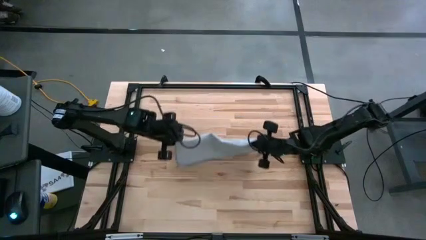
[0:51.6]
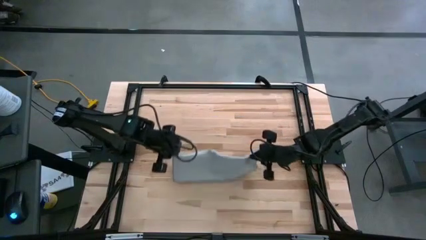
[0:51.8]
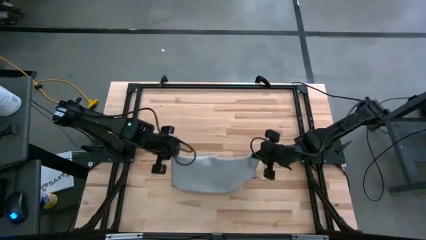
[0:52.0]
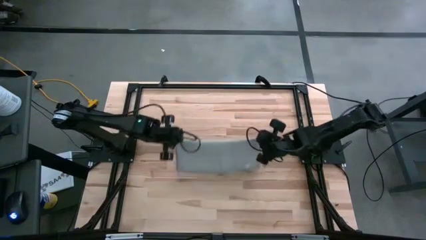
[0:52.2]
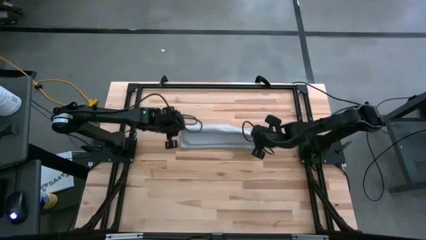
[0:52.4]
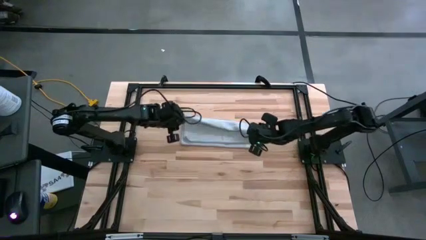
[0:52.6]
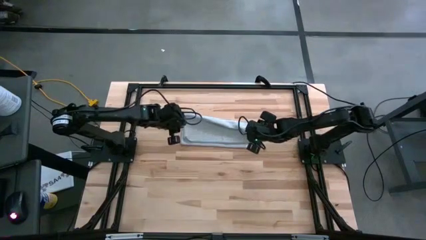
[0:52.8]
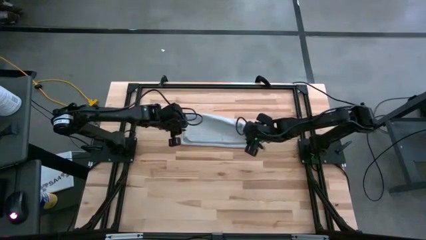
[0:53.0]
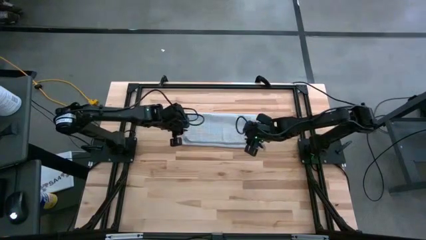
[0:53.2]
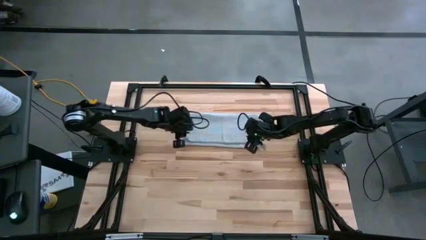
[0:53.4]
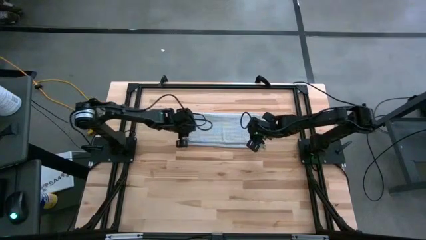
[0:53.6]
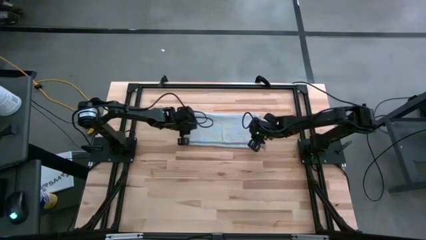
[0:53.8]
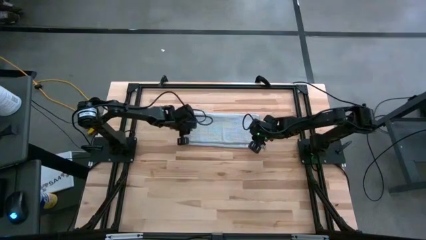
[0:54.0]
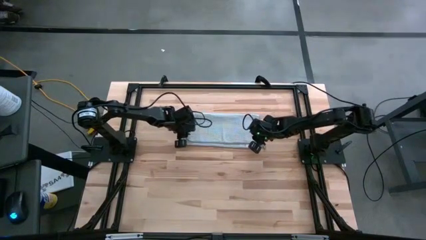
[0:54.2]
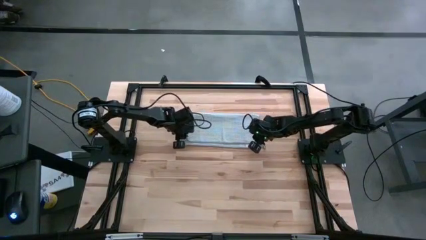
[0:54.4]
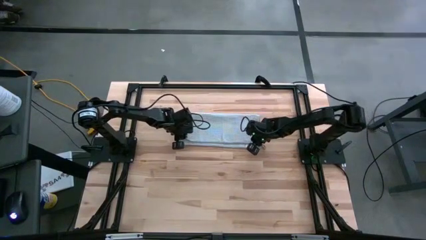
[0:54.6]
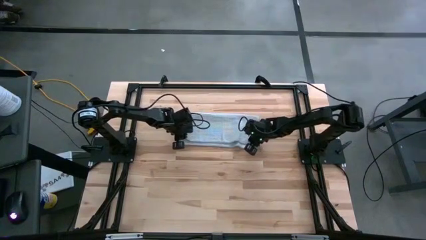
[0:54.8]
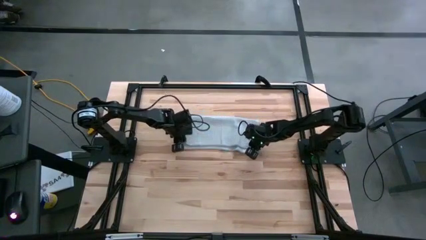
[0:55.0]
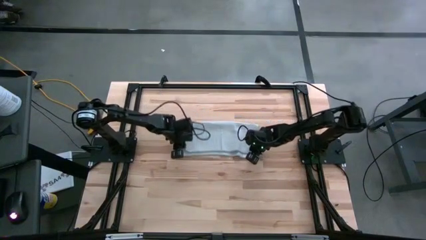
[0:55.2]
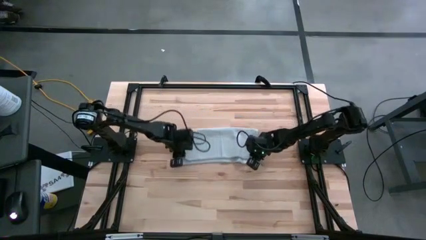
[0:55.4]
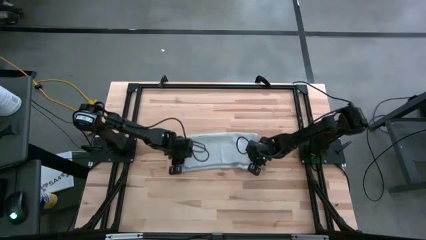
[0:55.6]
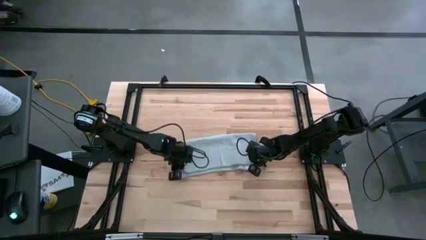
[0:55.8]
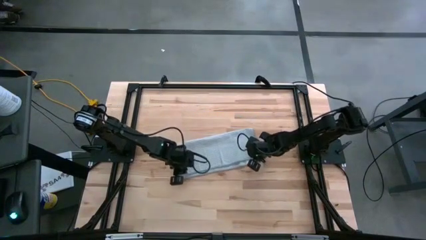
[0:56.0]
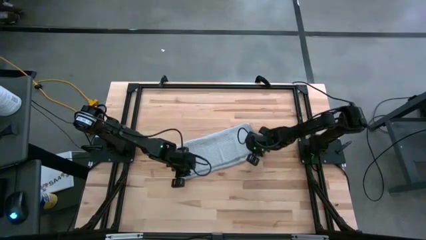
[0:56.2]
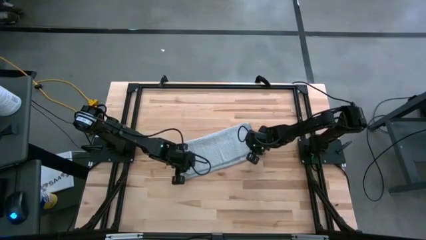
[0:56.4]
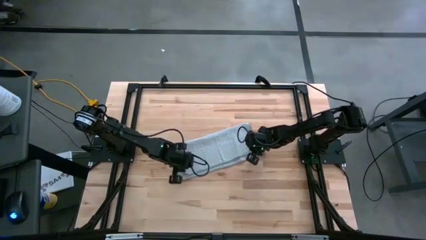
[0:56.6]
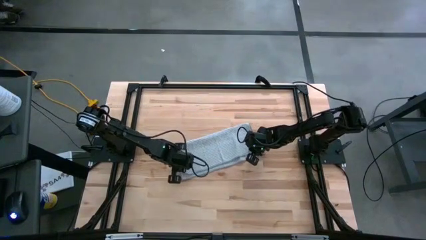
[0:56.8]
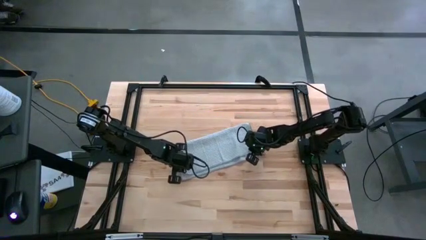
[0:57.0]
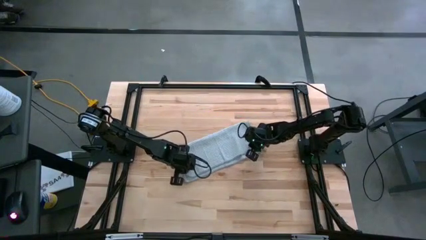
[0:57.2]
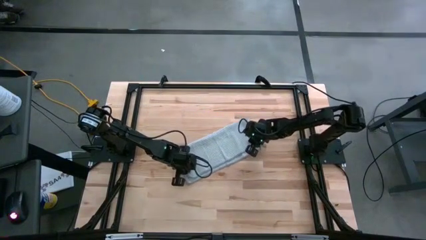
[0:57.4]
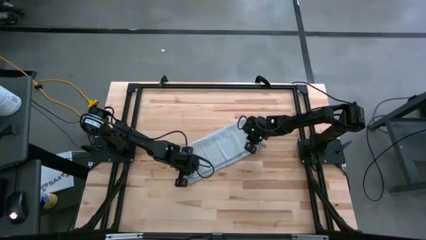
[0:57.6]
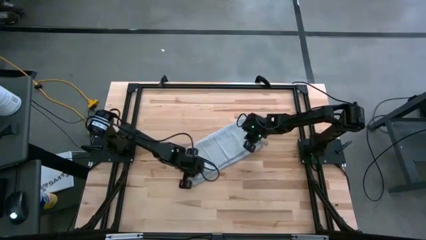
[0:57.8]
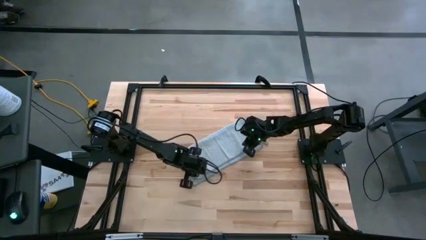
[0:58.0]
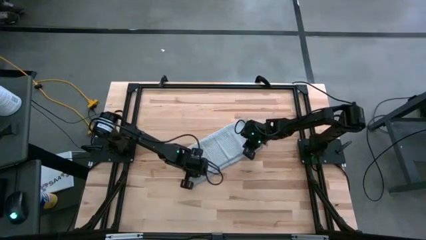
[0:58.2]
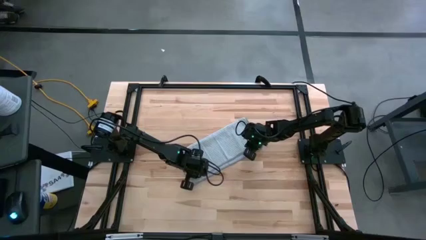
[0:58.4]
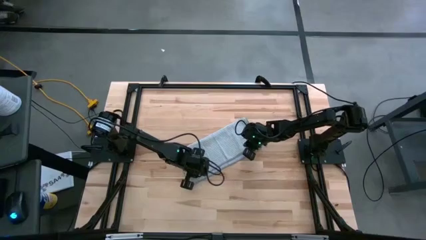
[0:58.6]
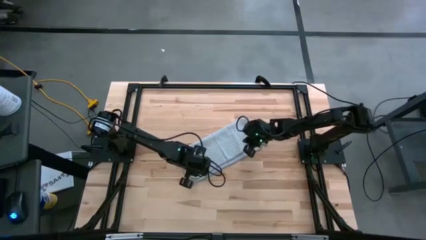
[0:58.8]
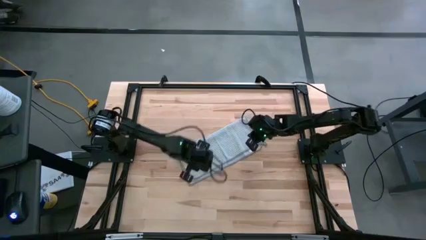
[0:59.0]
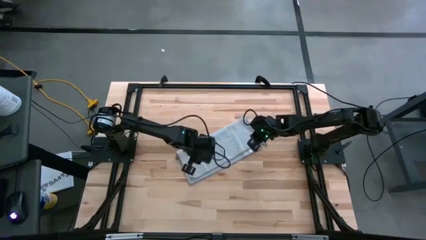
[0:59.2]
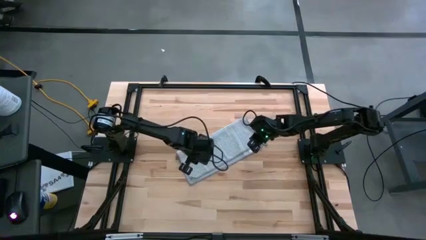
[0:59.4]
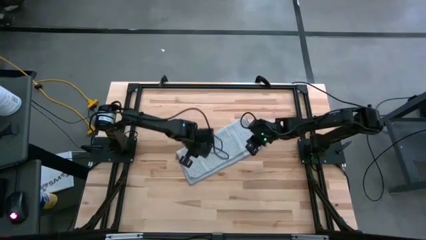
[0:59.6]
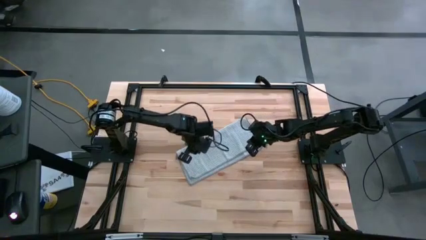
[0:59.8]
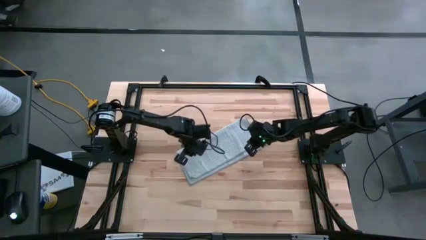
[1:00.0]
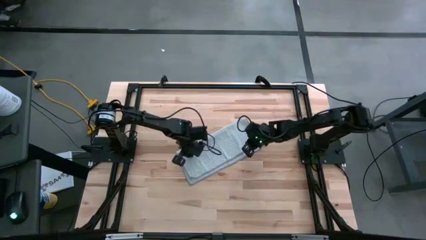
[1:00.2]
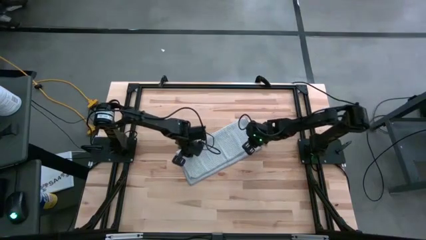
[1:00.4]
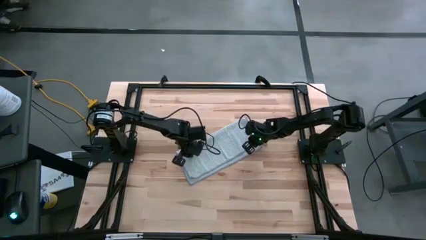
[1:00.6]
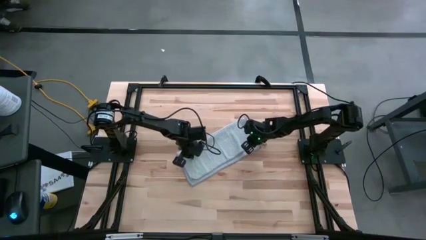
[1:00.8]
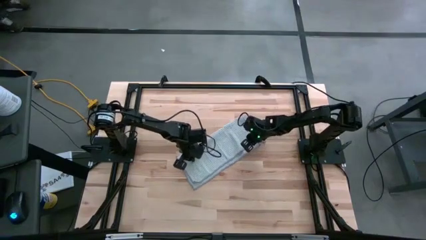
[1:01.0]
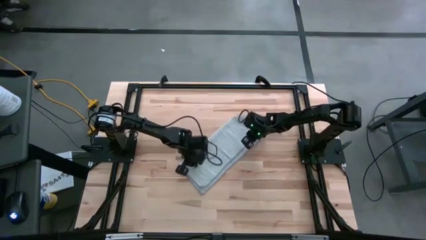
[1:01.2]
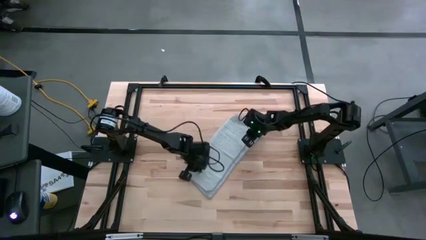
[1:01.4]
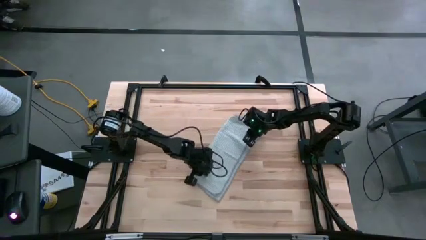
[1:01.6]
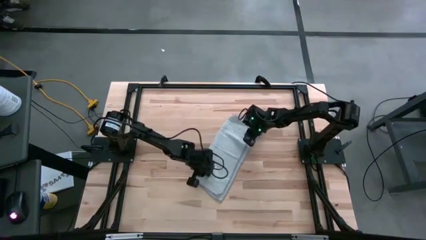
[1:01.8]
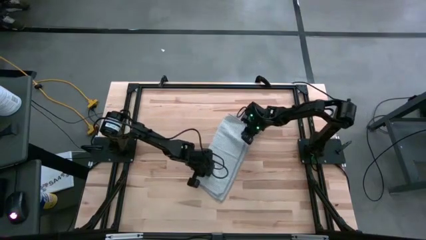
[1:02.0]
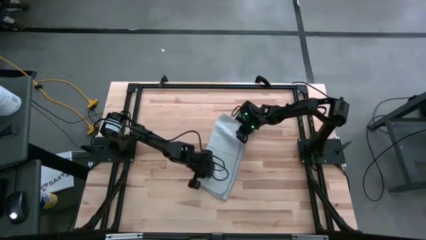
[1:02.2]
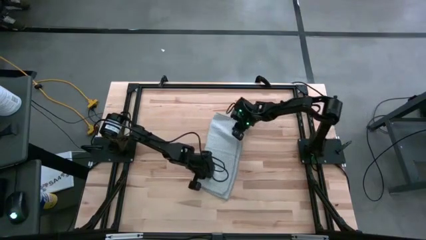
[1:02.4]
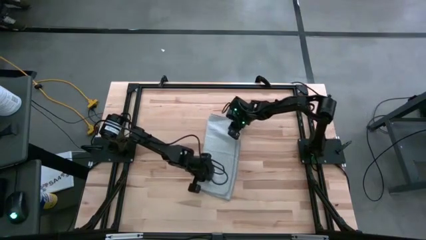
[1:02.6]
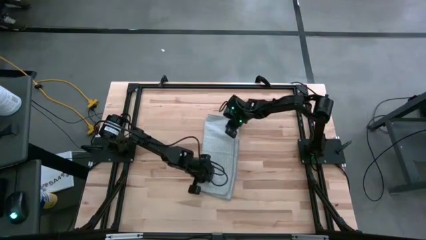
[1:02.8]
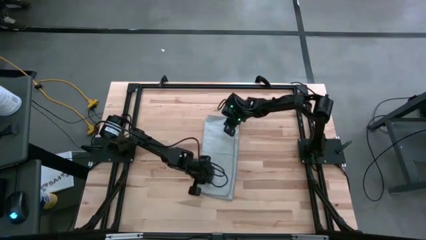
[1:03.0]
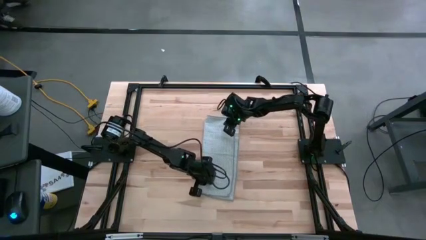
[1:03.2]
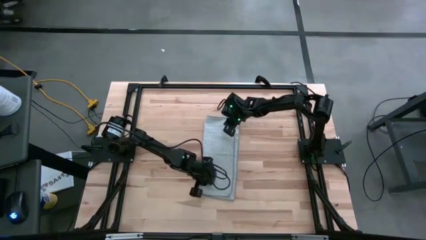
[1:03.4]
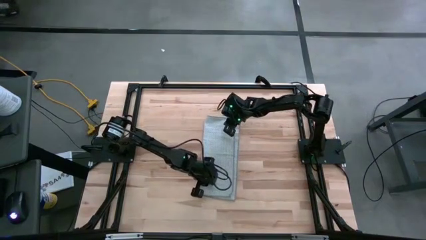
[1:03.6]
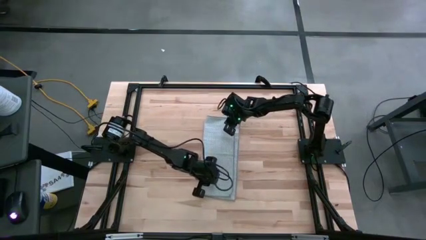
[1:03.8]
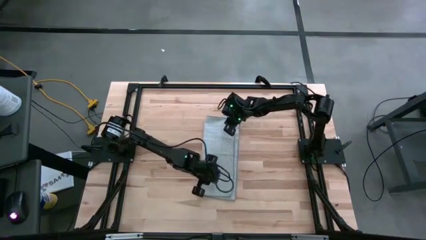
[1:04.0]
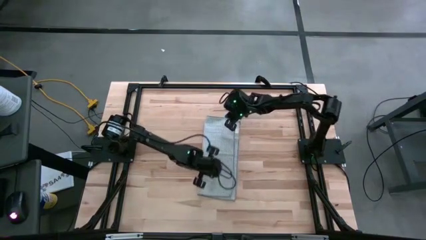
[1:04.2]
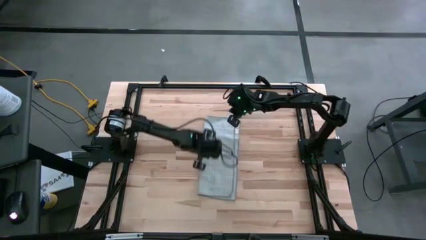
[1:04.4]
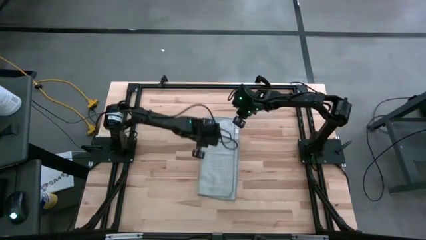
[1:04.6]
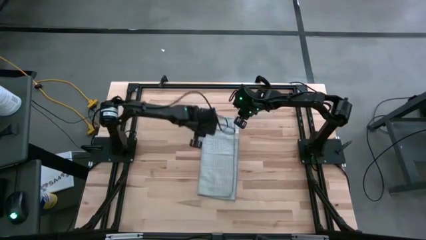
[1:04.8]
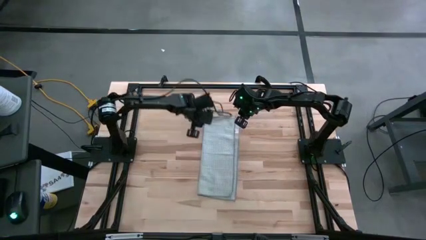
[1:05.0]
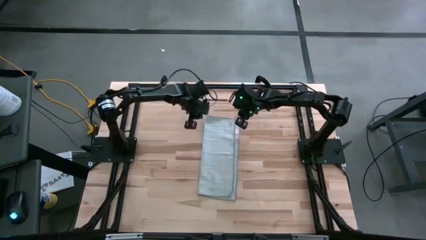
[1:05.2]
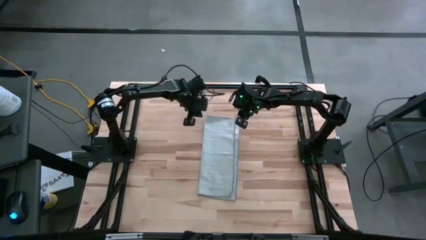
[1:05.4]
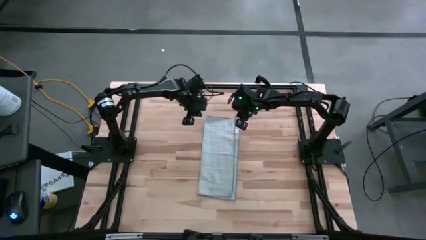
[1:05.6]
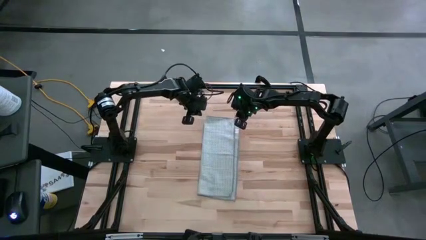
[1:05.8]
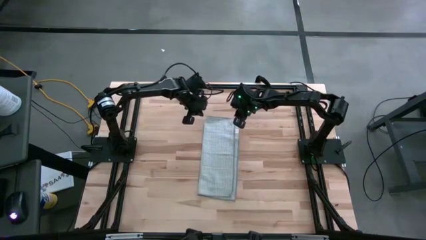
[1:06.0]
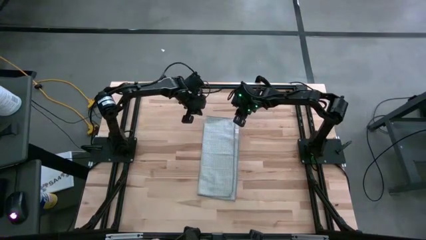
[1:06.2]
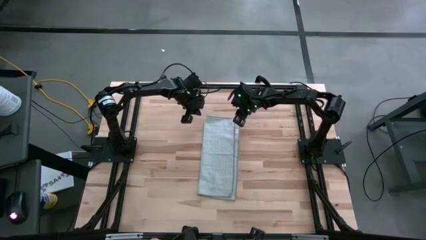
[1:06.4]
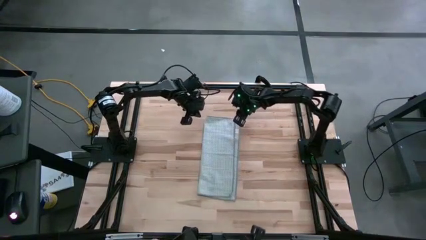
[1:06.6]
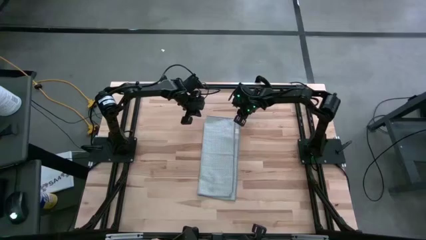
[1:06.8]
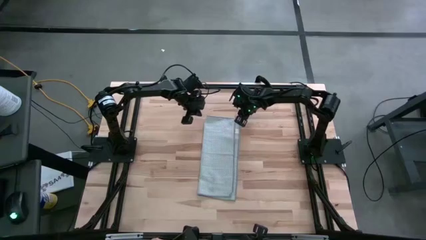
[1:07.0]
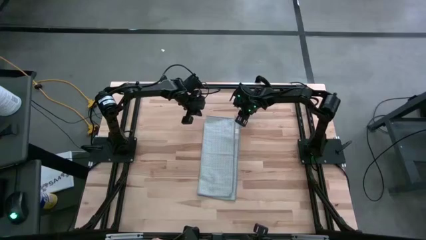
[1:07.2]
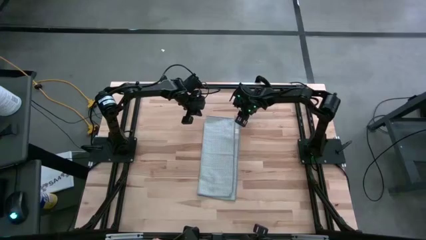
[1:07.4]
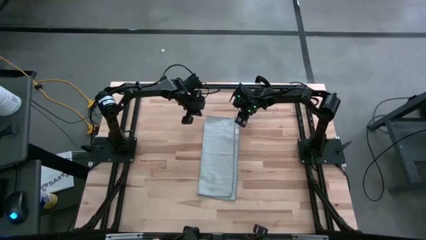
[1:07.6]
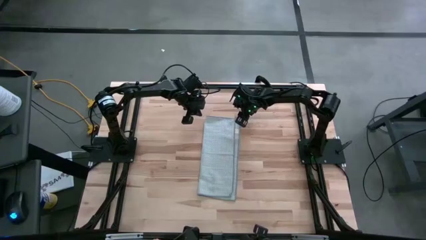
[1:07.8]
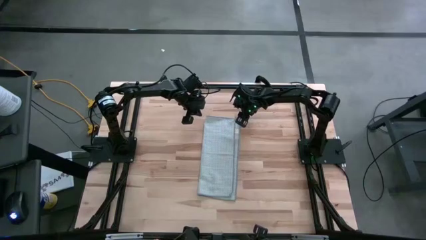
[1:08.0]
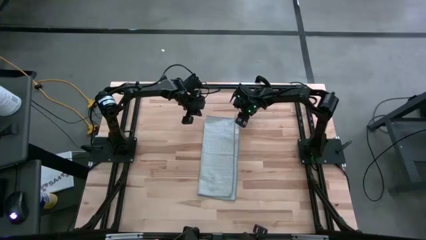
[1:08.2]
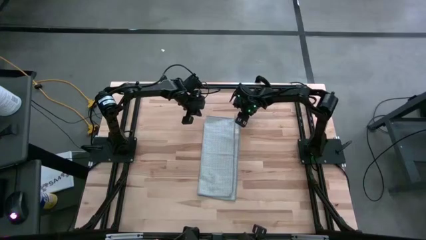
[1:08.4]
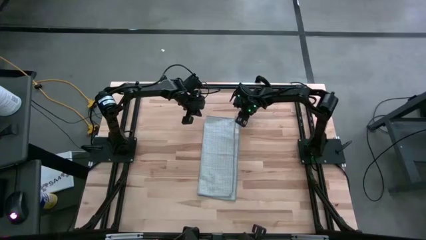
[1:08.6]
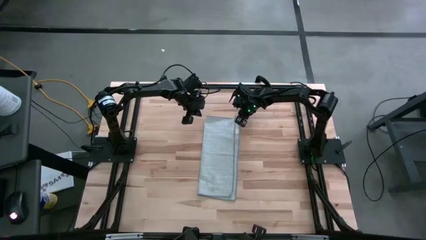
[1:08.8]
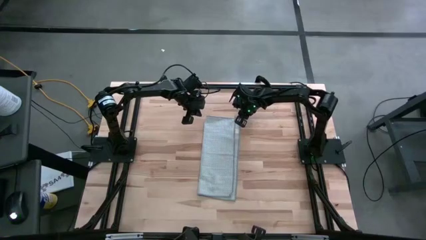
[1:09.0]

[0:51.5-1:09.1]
Task: Fold microfiber towels
Fold the gray microfiber towel
